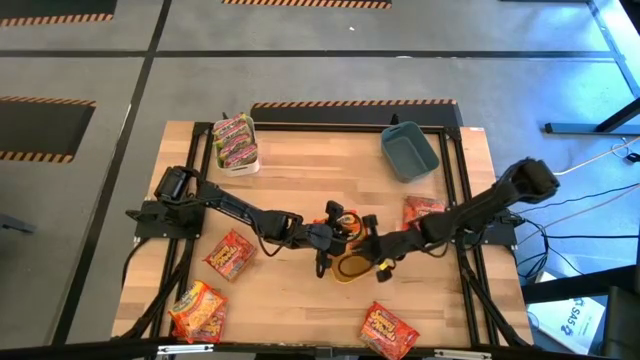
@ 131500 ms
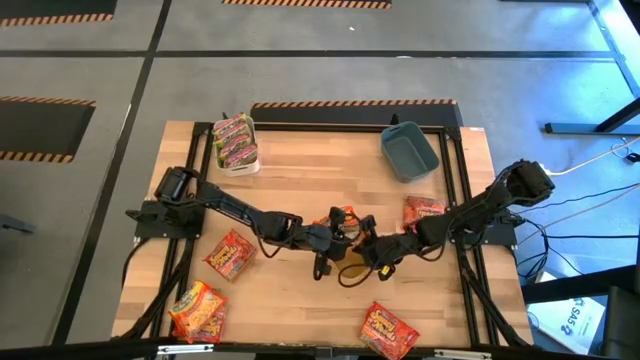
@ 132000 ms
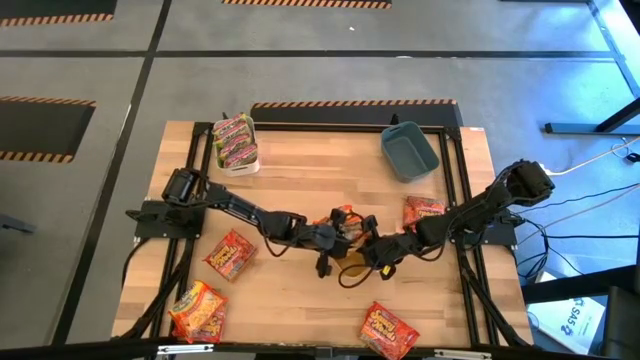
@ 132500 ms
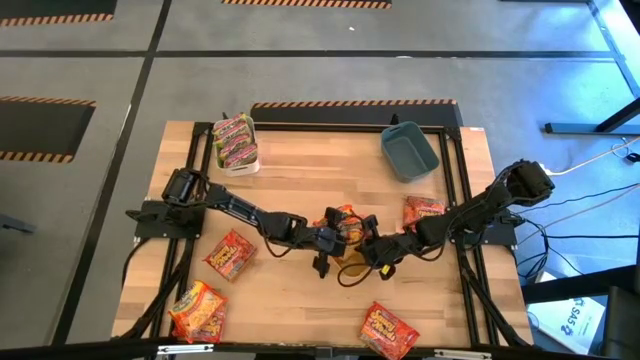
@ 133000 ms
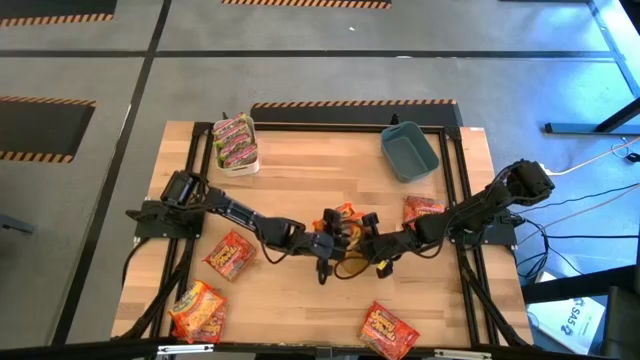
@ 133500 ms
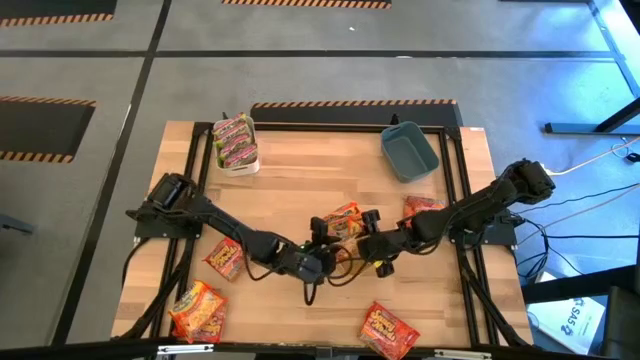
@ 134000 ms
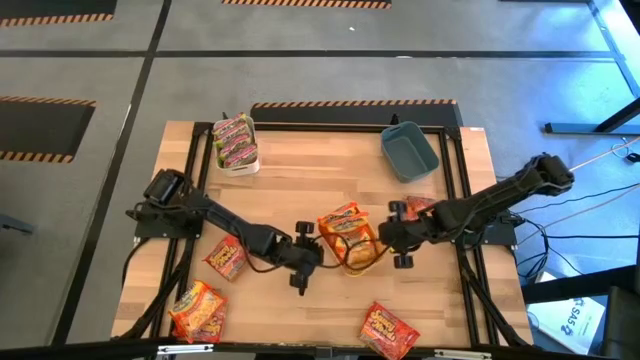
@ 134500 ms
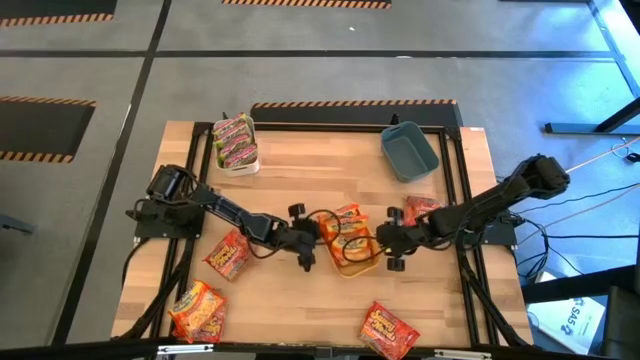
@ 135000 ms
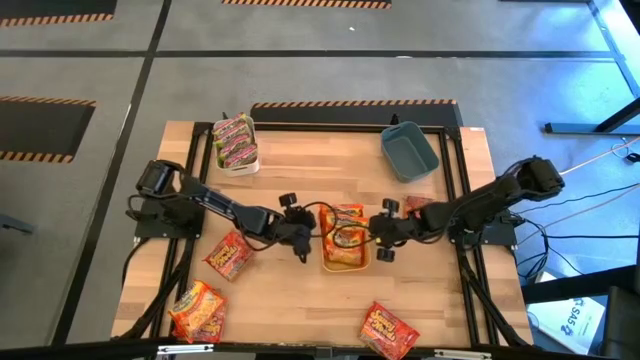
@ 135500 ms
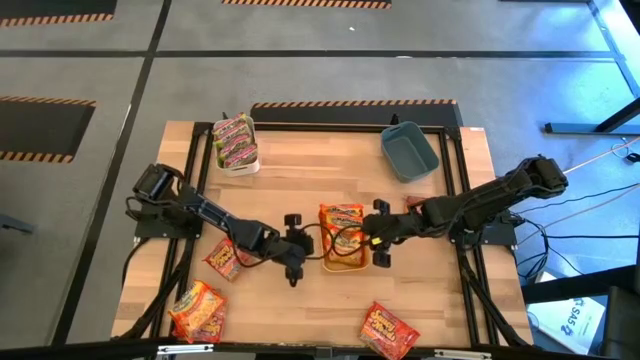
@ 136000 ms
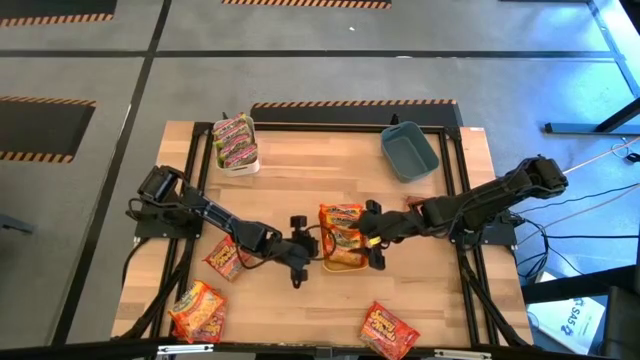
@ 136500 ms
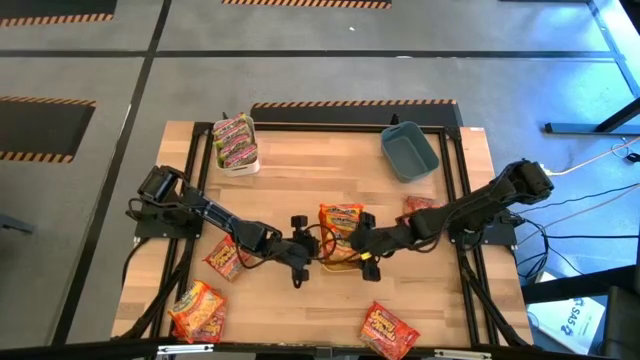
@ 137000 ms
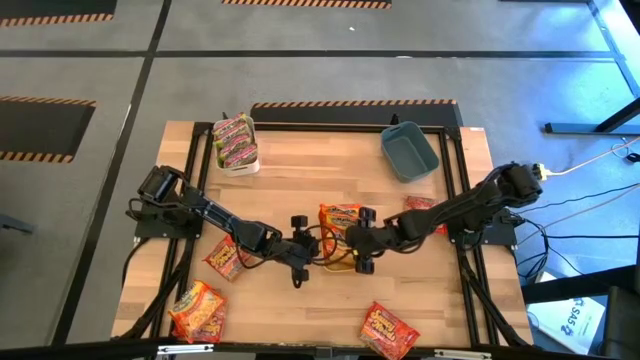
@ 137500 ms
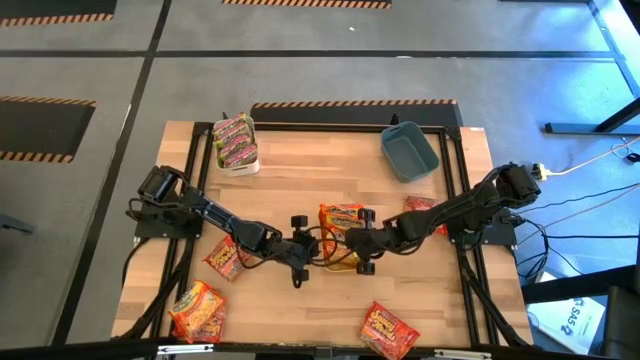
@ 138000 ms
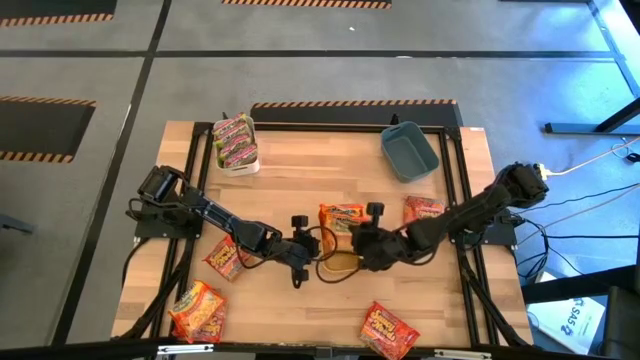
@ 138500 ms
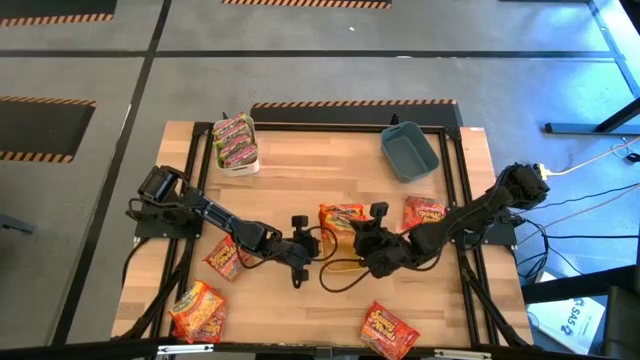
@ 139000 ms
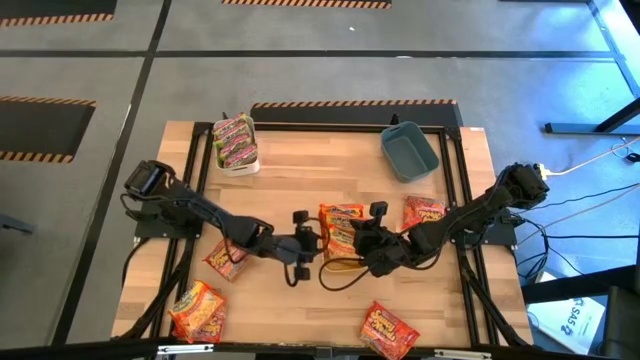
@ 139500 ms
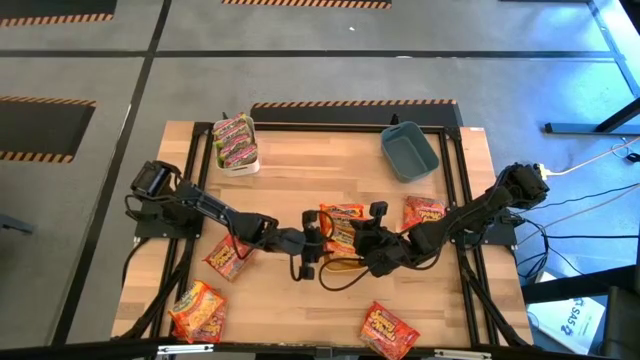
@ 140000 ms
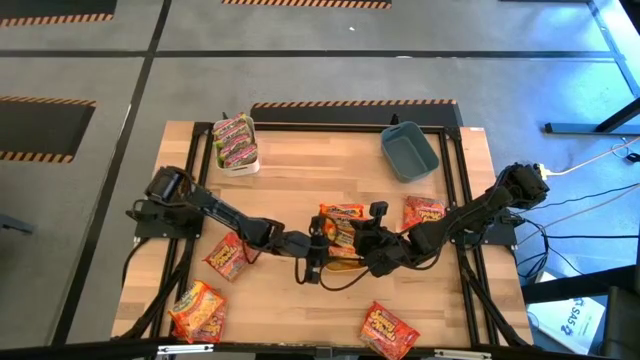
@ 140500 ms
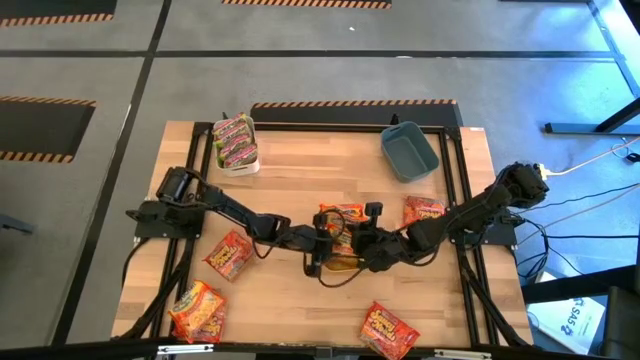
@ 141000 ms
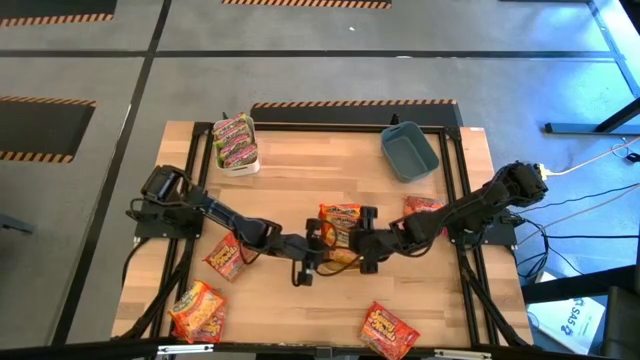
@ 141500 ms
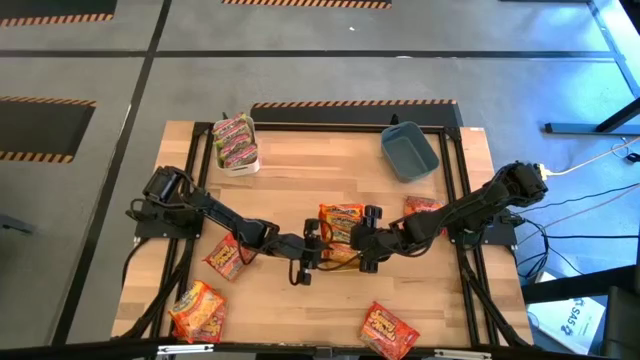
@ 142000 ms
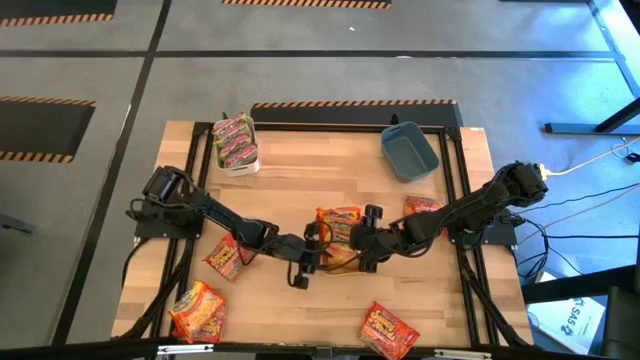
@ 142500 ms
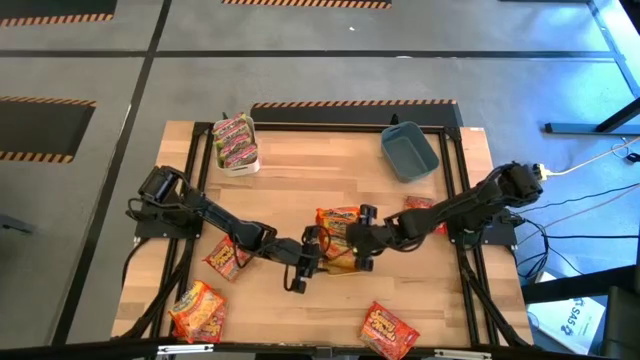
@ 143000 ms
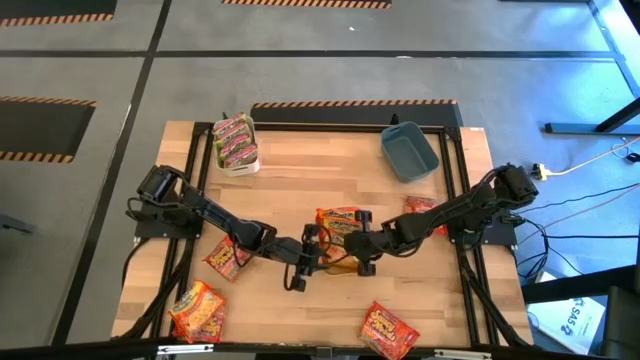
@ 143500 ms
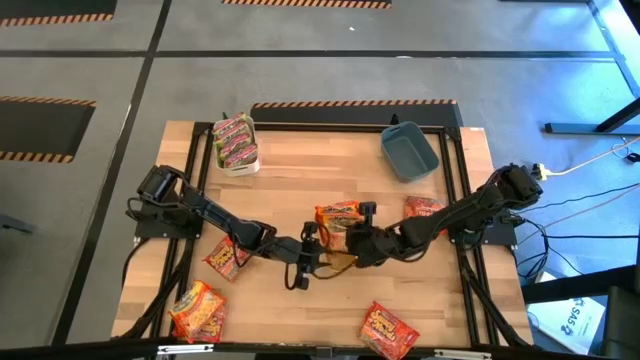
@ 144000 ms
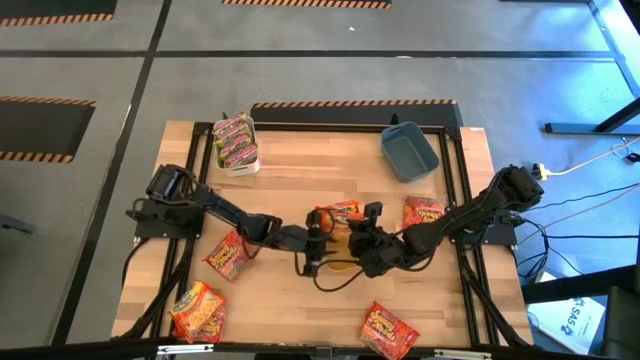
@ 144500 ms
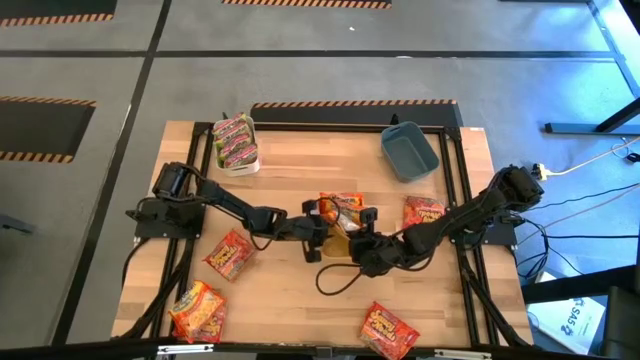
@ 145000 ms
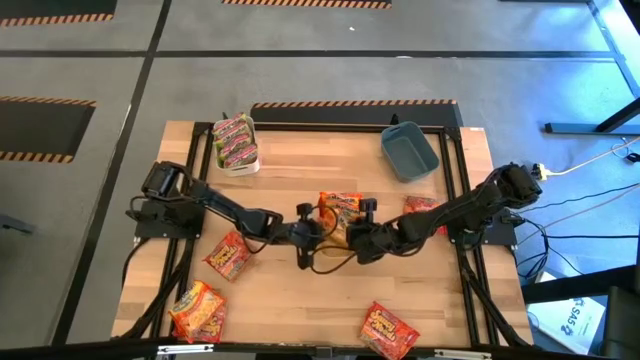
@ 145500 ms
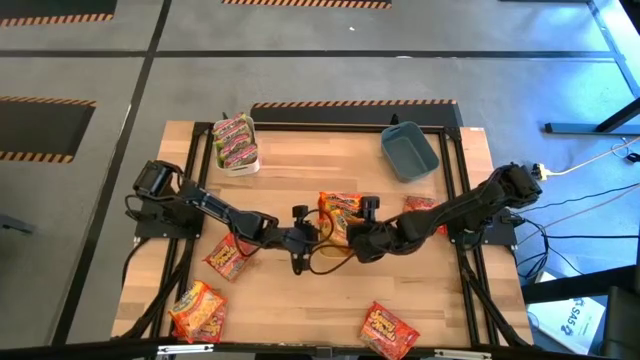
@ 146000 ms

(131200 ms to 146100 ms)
Task: Sort Maruchan noodles
Put the top orange noodle pack into the yellow bin

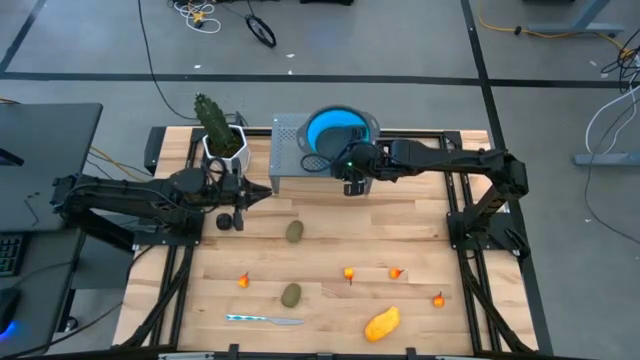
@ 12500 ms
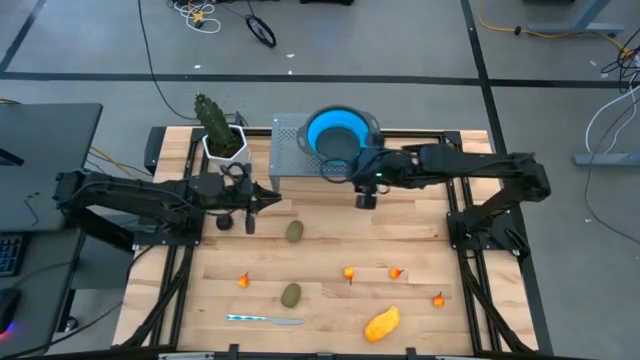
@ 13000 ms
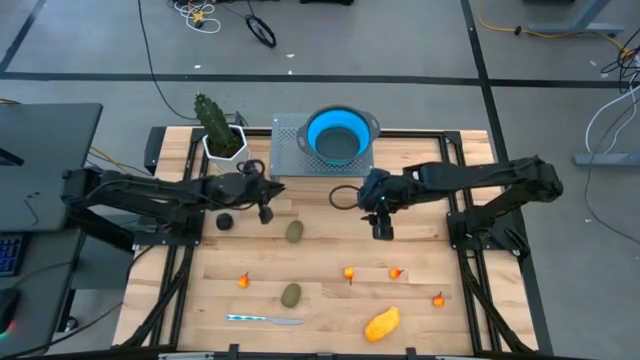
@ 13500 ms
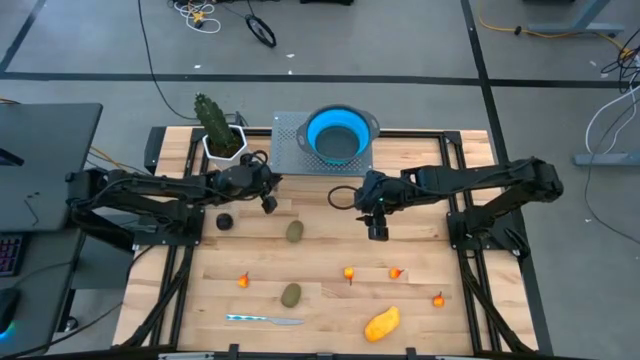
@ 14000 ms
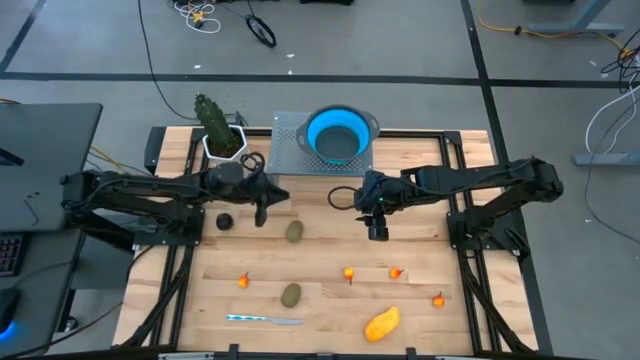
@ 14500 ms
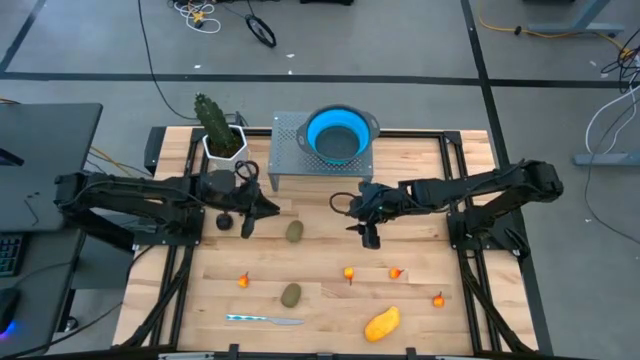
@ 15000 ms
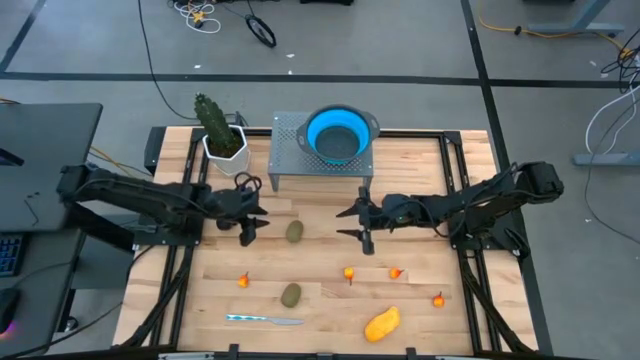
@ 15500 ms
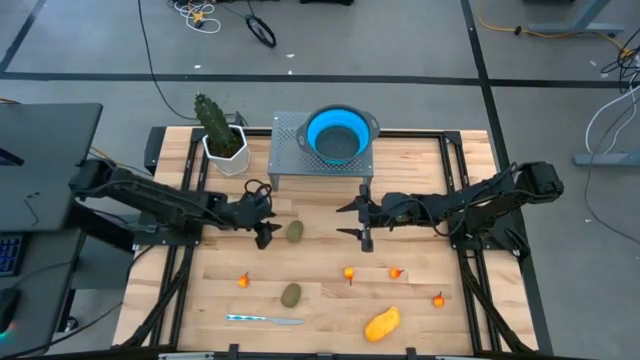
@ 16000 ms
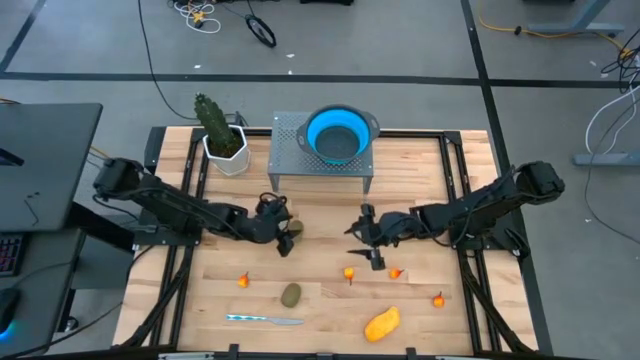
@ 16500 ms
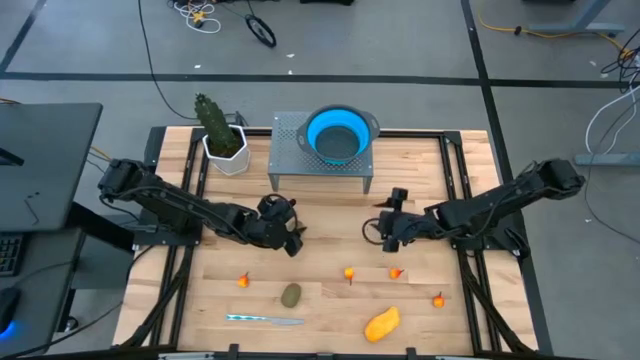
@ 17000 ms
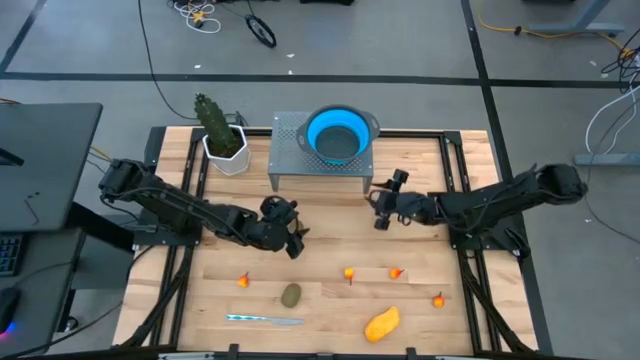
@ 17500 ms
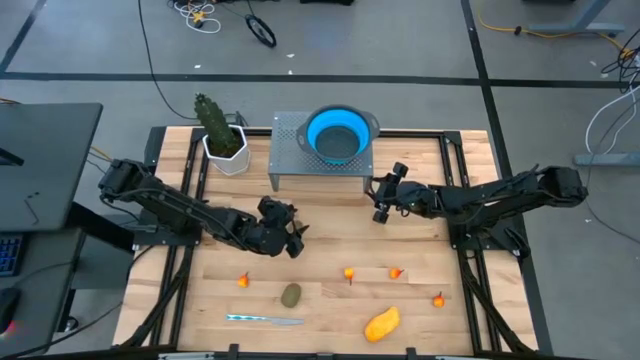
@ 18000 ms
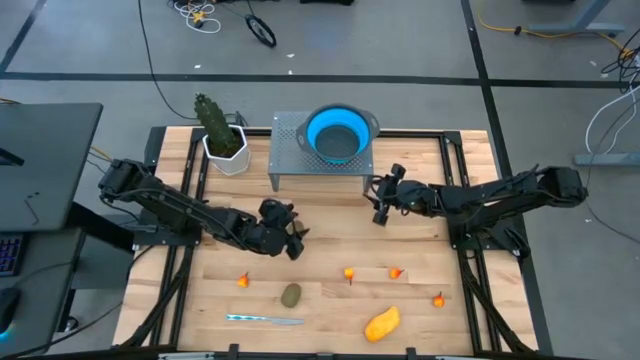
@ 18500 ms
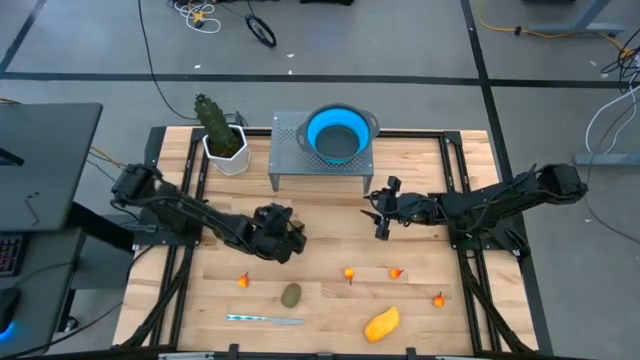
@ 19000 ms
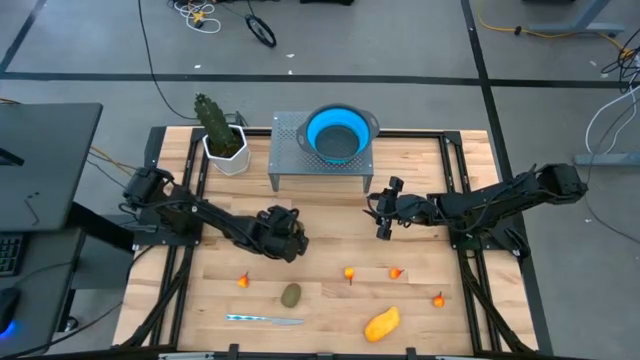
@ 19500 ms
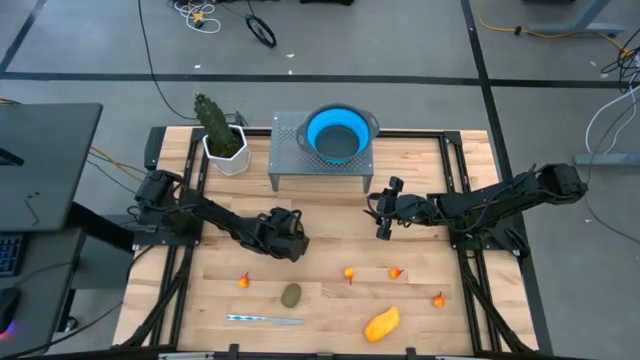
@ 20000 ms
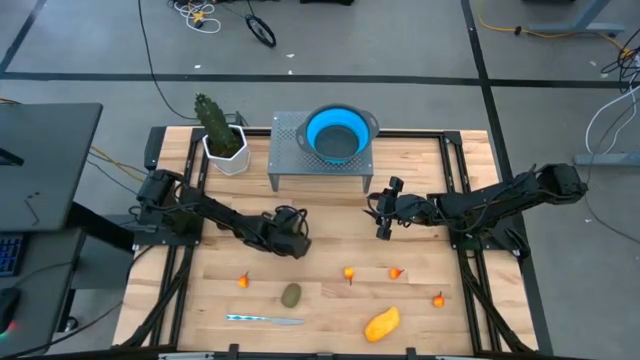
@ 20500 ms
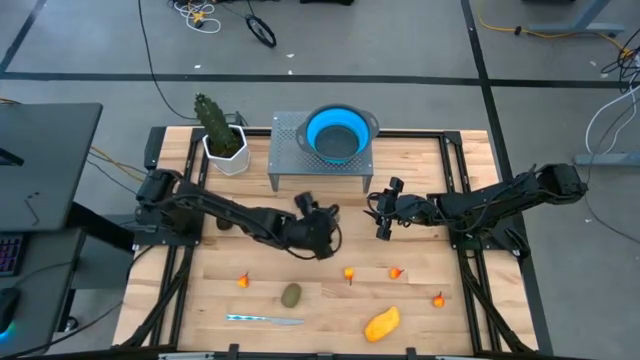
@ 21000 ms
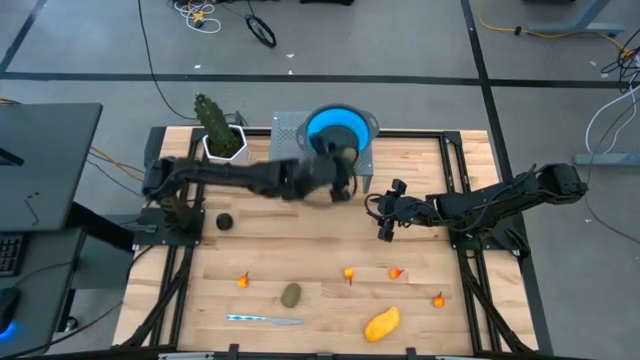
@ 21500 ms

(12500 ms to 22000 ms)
Task: Pick & Place Fruit
Put the green kiwi in the blue strainer bowl on the shelf
